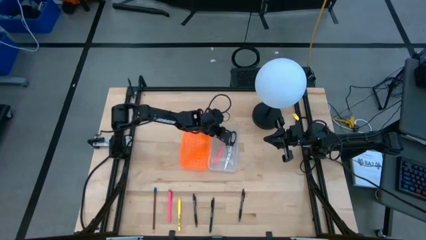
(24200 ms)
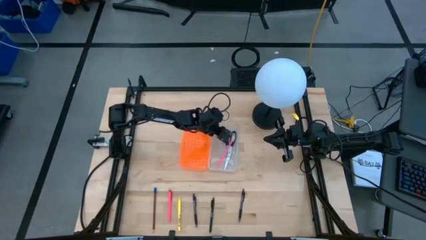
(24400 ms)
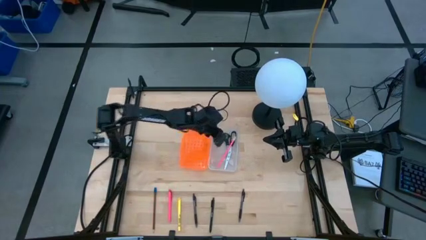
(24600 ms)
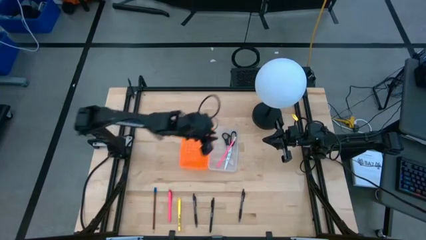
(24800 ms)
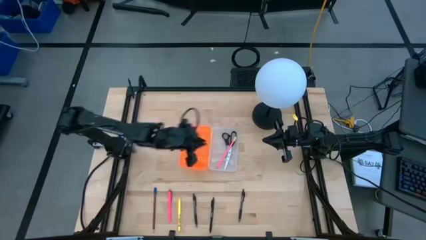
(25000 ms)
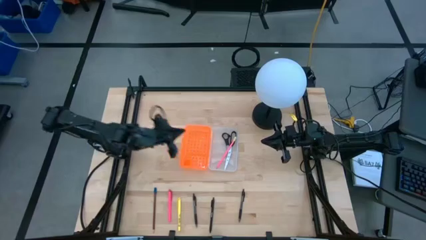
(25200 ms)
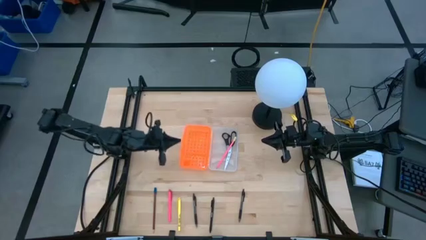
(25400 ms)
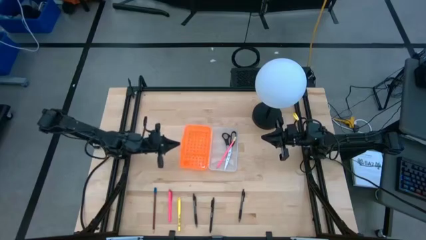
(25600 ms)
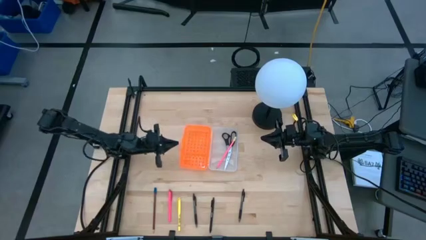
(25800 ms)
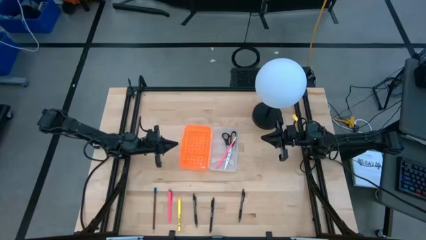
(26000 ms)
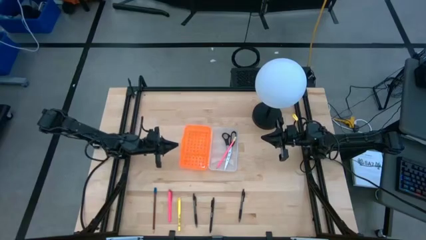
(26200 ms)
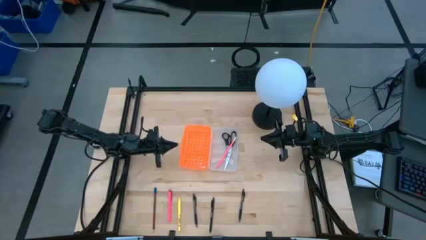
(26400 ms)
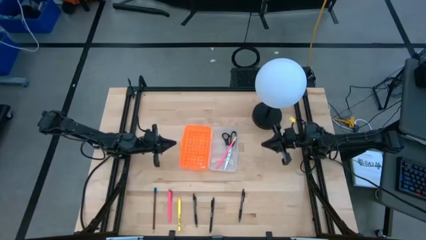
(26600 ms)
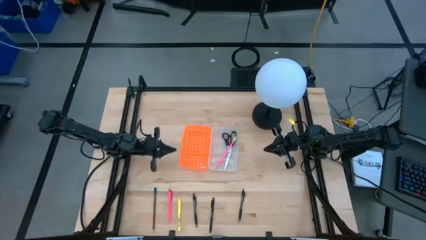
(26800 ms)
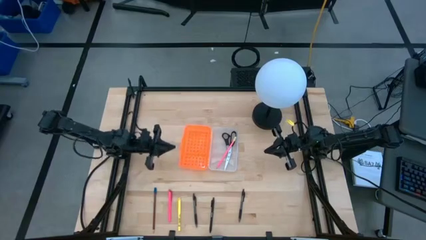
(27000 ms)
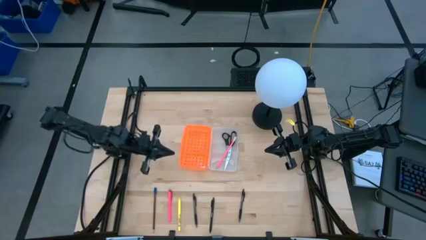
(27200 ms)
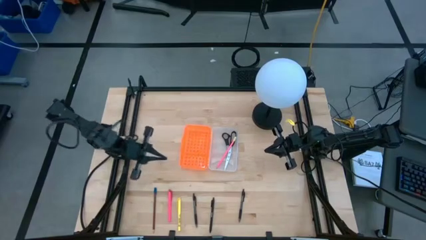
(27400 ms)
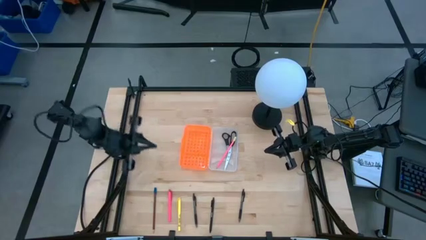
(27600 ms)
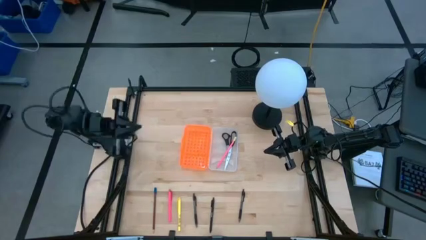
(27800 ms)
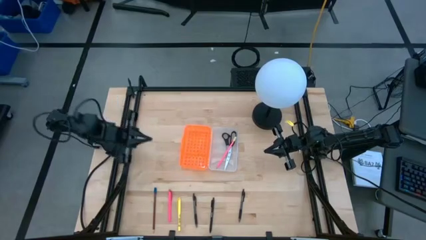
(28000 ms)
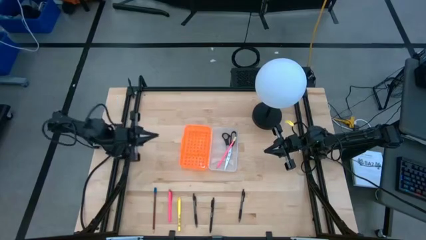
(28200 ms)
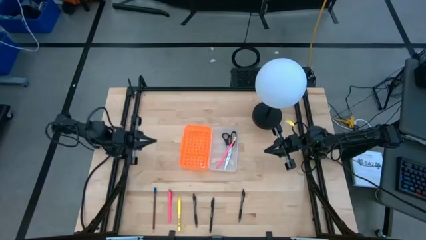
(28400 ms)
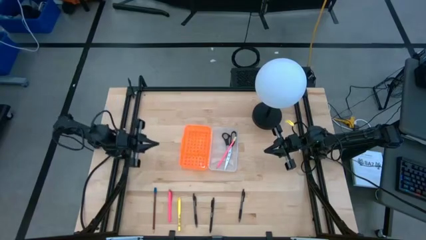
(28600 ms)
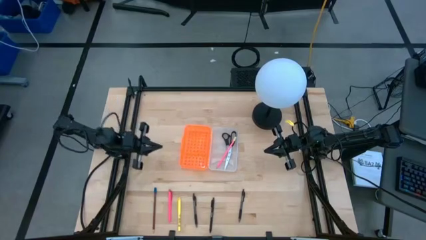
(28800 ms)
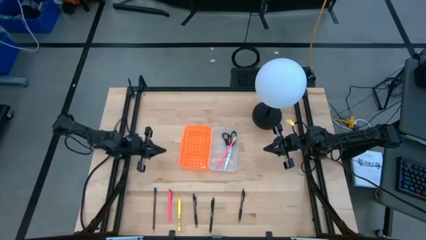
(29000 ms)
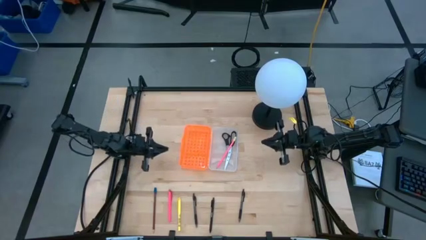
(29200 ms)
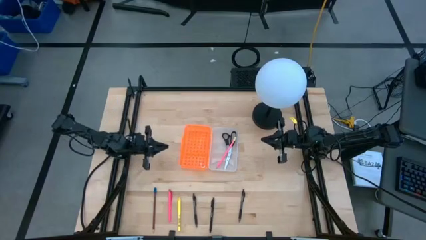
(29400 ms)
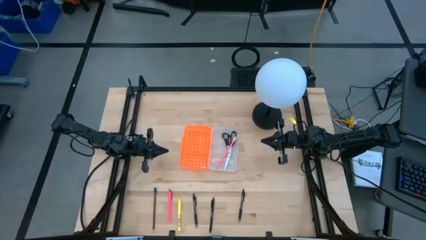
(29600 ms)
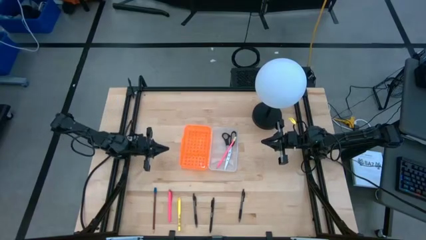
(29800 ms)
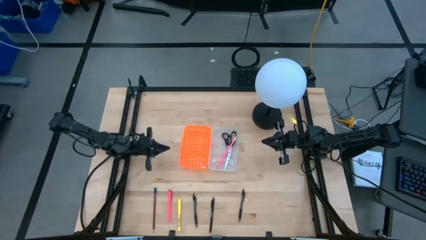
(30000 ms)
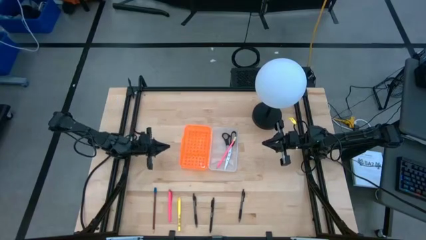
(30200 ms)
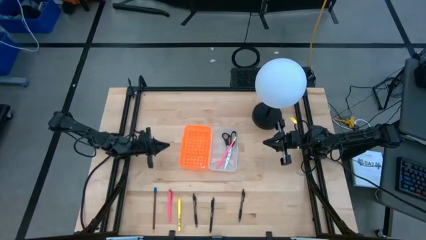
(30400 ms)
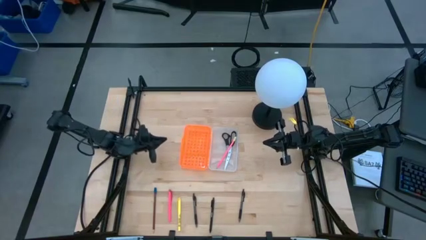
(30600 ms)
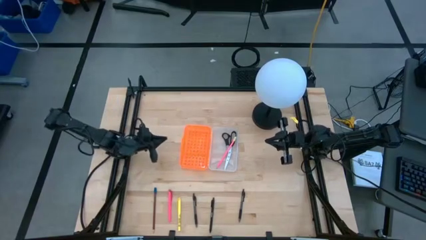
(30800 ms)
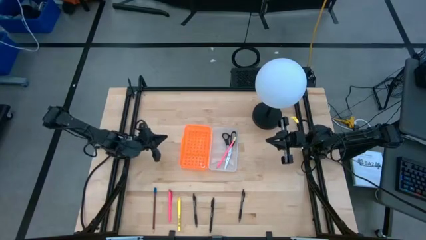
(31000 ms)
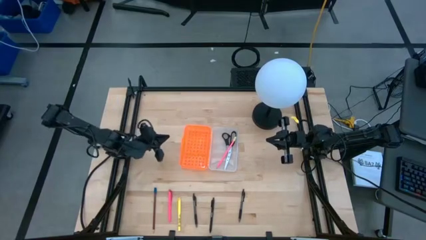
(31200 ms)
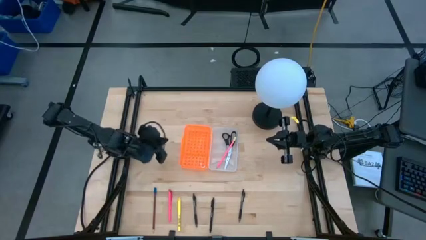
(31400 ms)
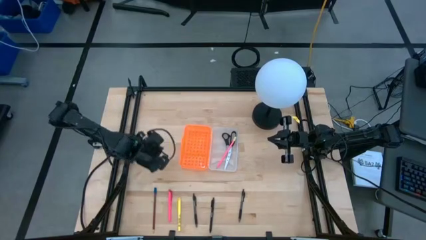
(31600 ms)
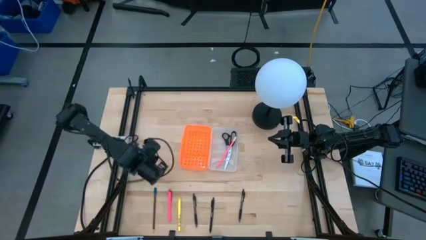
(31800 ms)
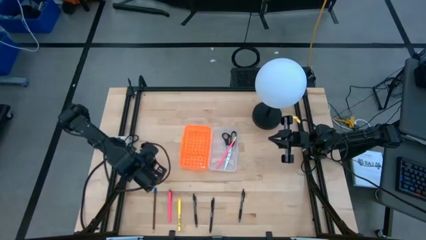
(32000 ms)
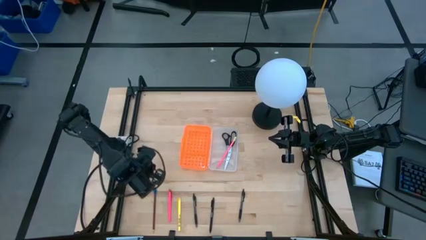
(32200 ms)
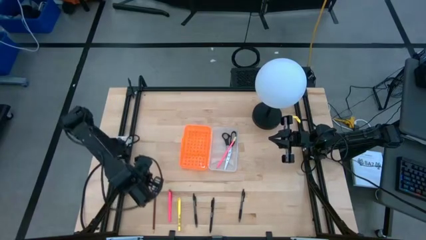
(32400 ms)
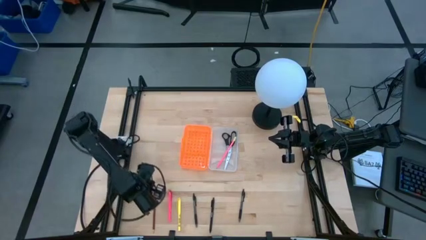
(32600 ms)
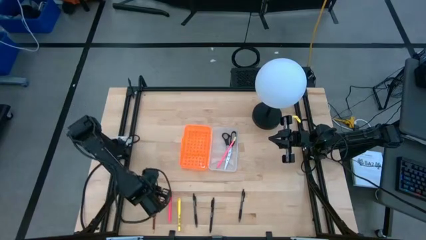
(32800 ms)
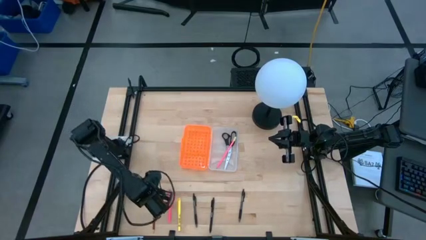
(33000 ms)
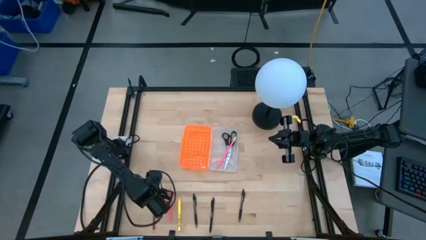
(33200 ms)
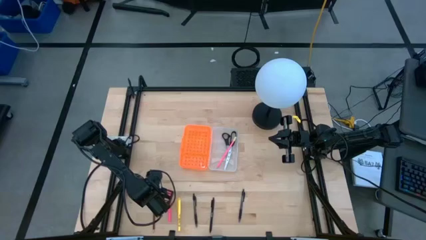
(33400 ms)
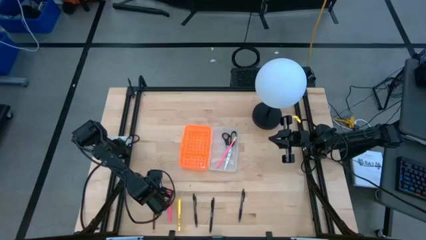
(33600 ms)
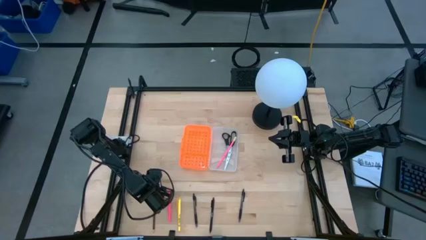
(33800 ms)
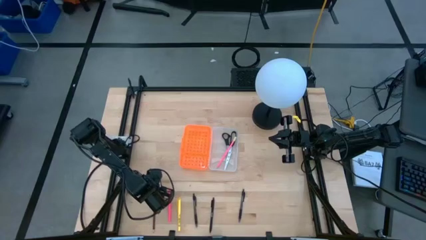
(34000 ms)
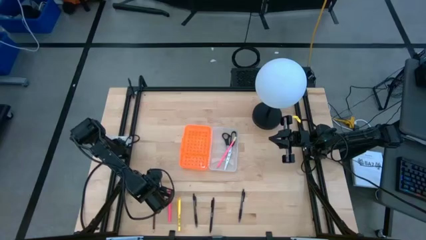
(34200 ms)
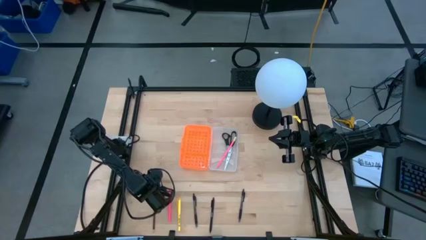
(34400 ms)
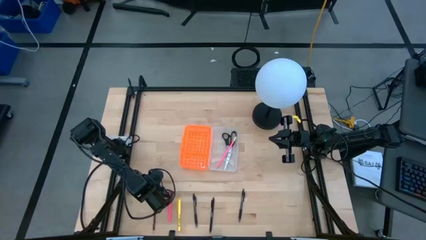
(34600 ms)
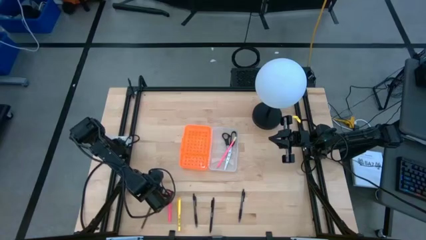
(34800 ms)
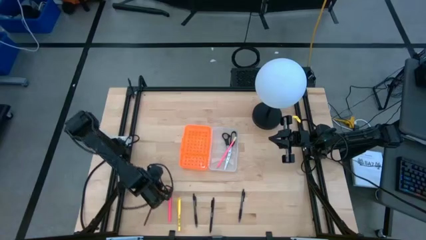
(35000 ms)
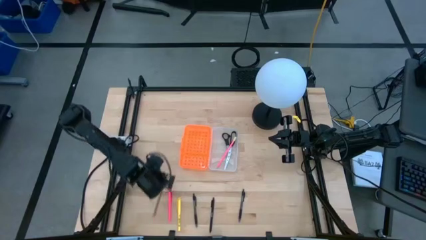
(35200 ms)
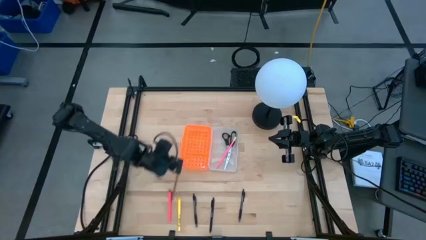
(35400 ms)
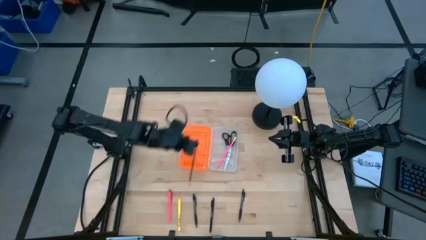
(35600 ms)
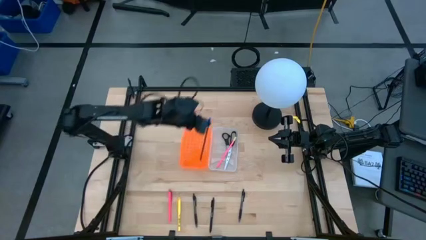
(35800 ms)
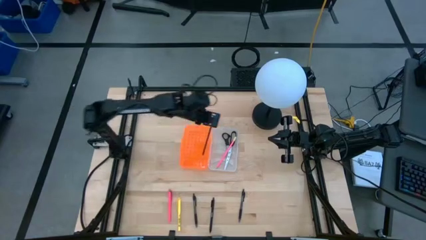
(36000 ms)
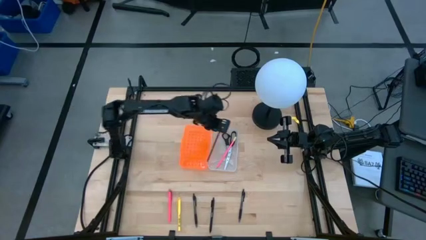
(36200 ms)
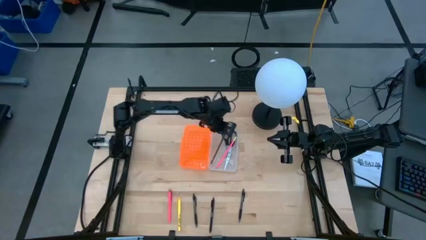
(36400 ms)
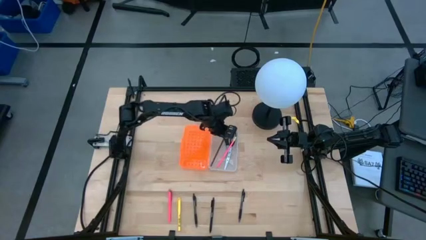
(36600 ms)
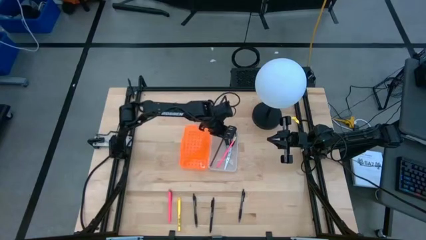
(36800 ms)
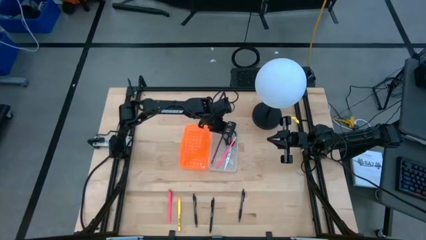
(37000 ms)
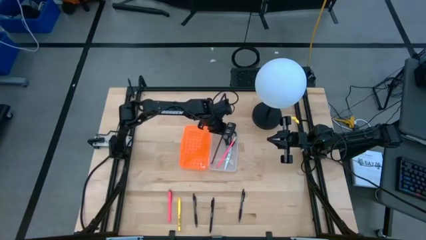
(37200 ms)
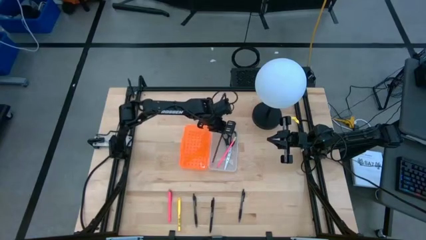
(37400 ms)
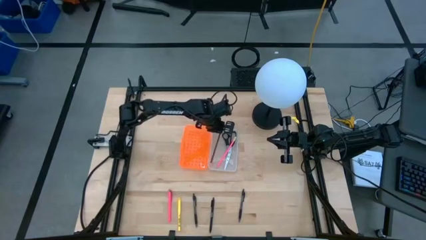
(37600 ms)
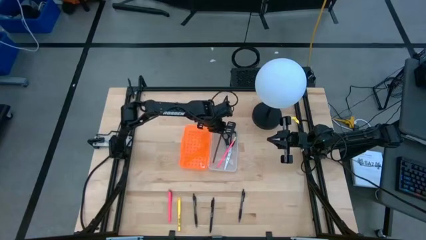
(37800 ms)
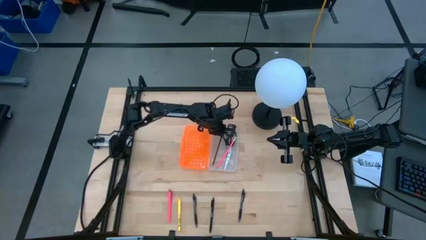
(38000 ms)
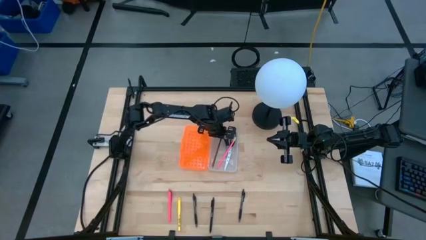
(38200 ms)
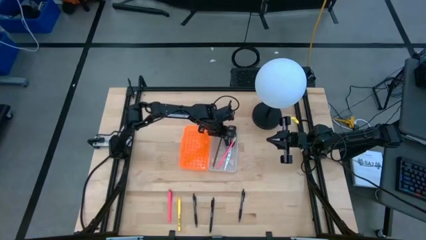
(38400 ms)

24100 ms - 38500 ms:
Task: Pick & place school supplies into a supply box
Put the brown pencil into the orange box

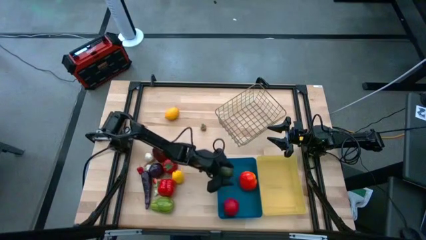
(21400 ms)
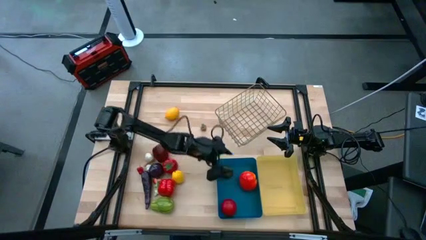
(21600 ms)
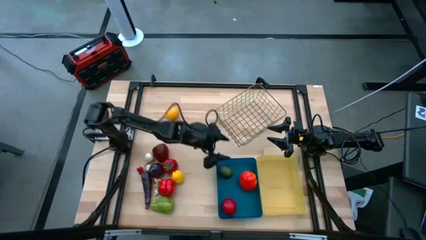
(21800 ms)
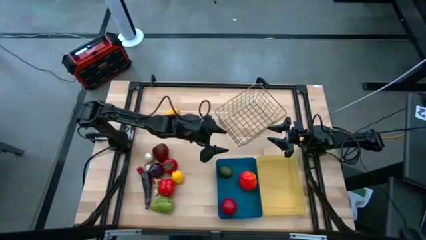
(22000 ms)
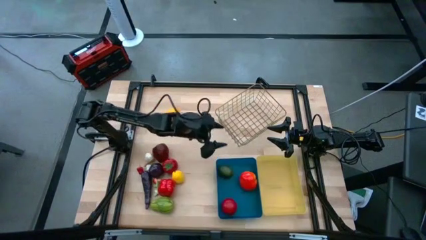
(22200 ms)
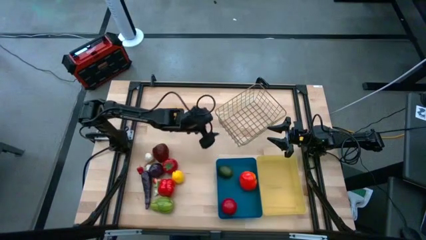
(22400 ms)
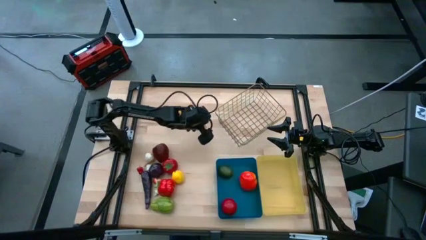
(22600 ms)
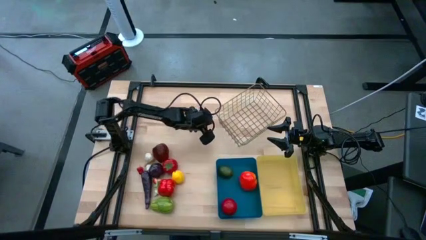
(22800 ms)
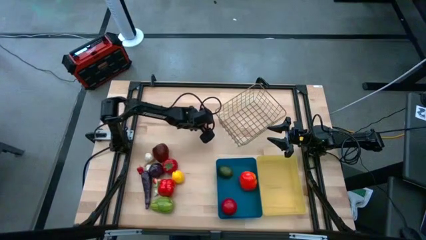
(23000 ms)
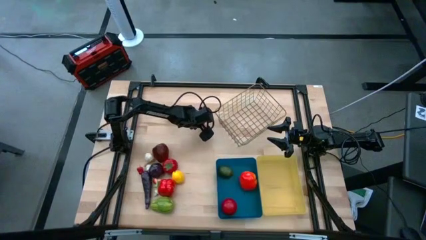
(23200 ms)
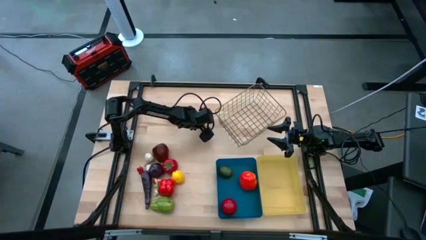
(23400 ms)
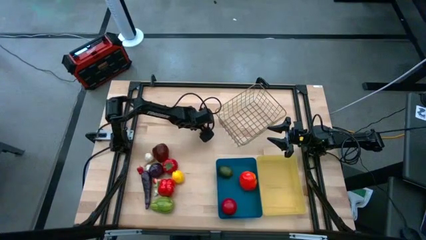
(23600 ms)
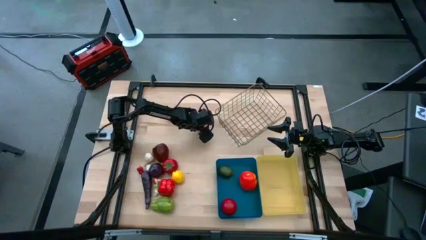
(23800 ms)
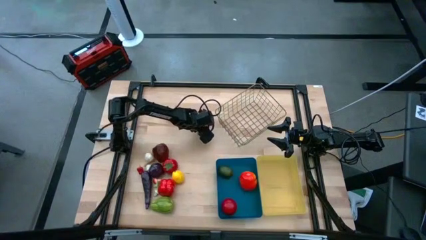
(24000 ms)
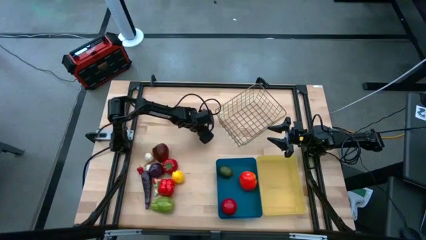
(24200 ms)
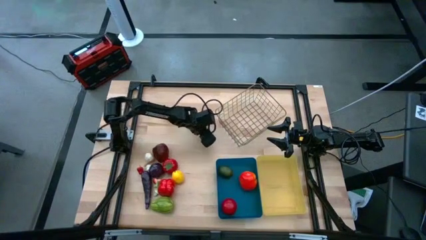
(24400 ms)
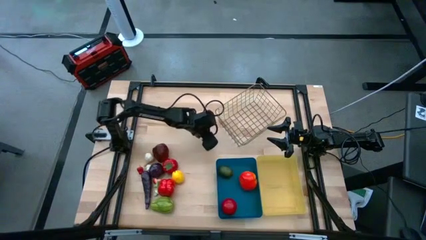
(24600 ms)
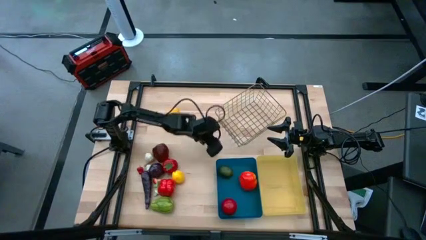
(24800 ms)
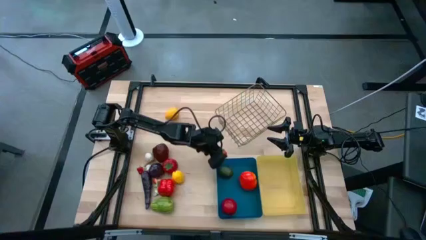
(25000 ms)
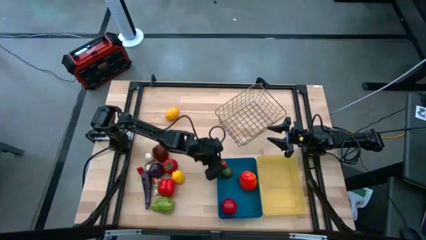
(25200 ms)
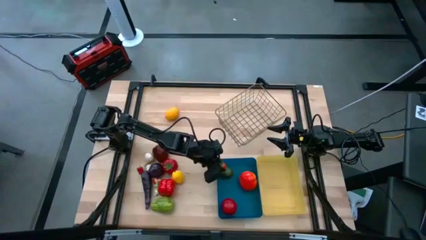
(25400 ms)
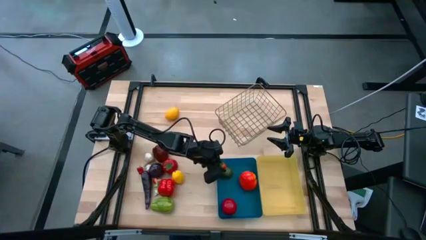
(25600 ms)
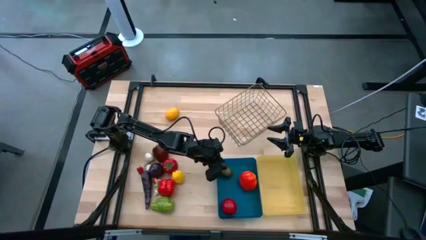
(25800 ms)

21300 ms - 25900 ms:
Task: Sort produce into baskets
Put the orange peach into the blue bin
